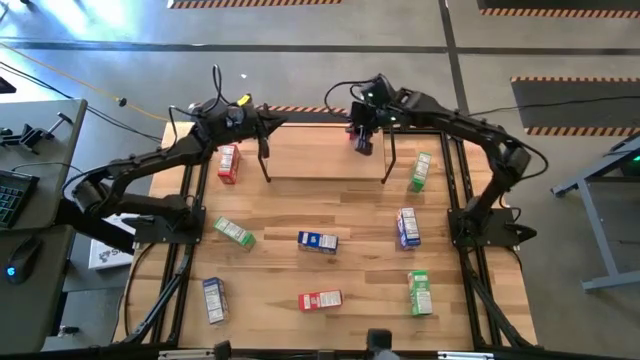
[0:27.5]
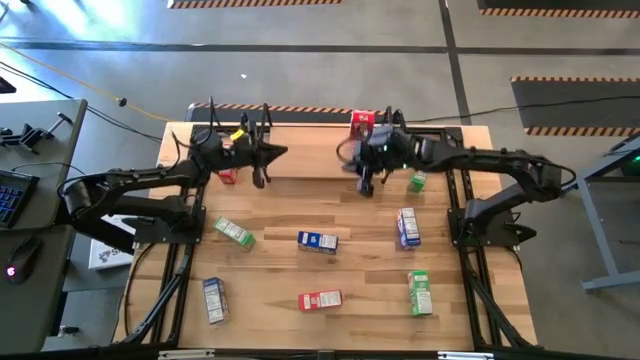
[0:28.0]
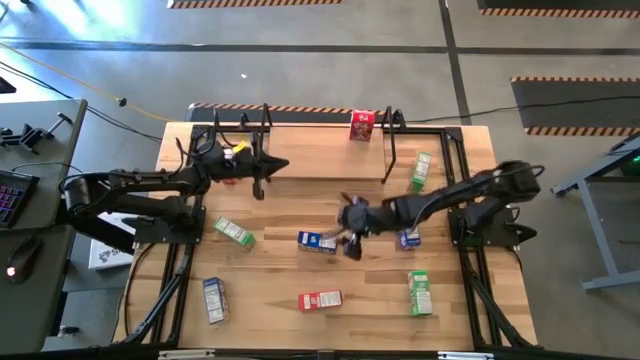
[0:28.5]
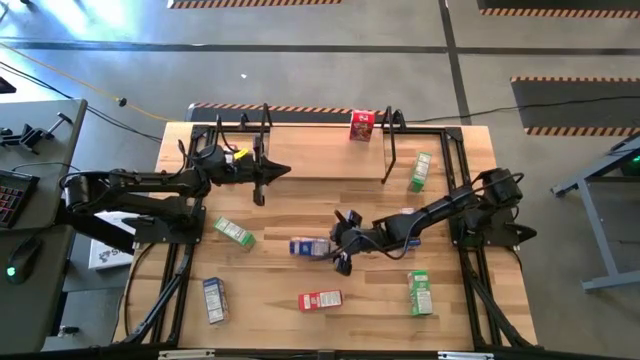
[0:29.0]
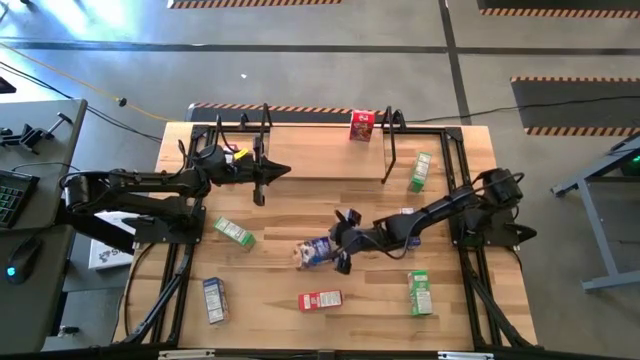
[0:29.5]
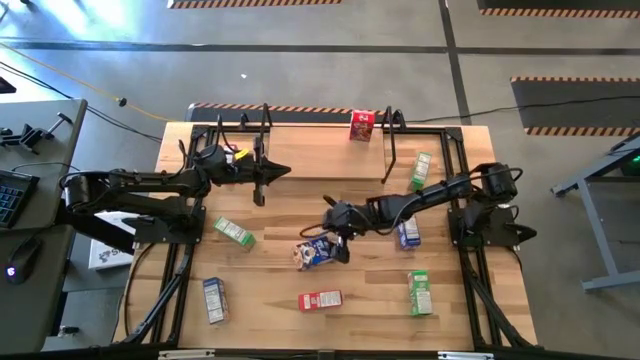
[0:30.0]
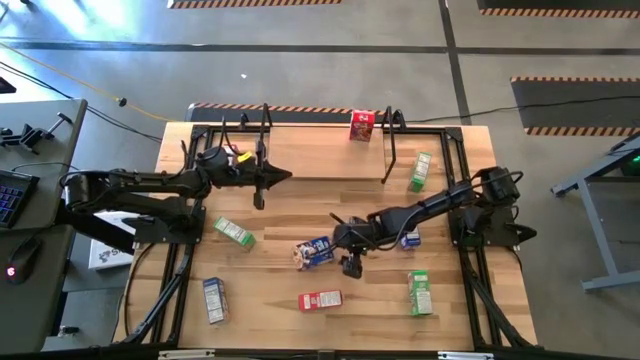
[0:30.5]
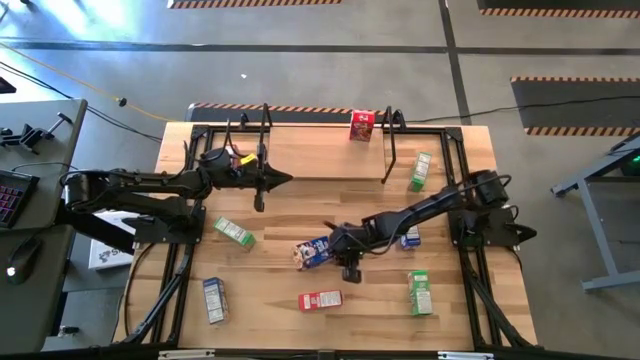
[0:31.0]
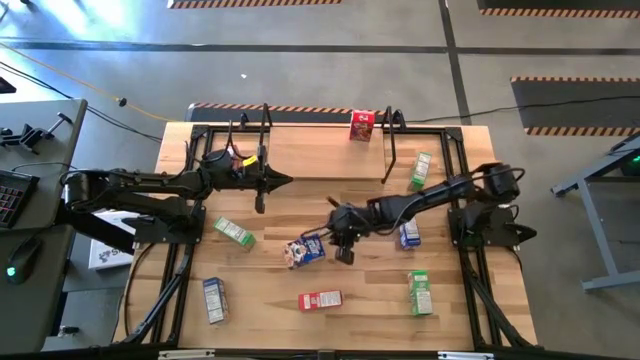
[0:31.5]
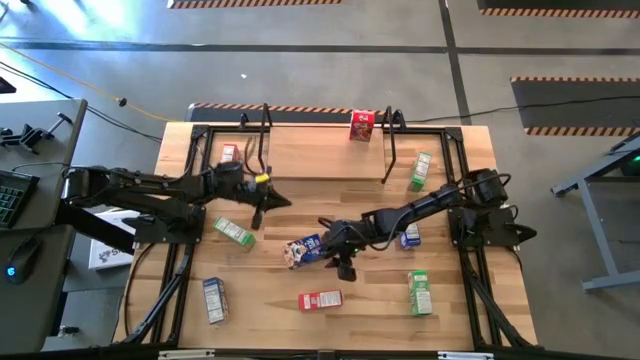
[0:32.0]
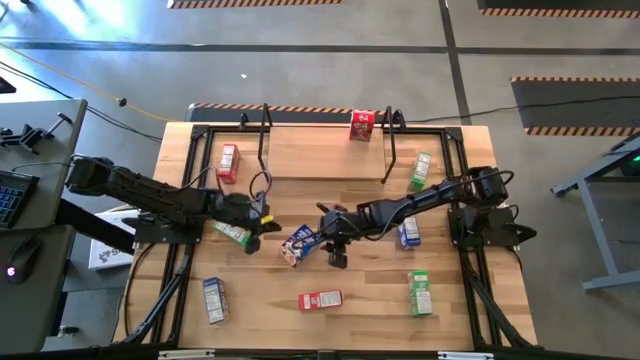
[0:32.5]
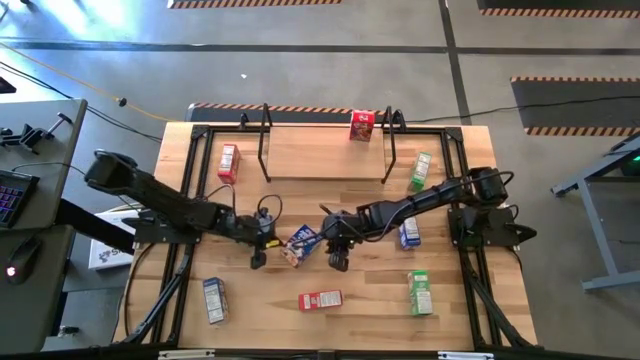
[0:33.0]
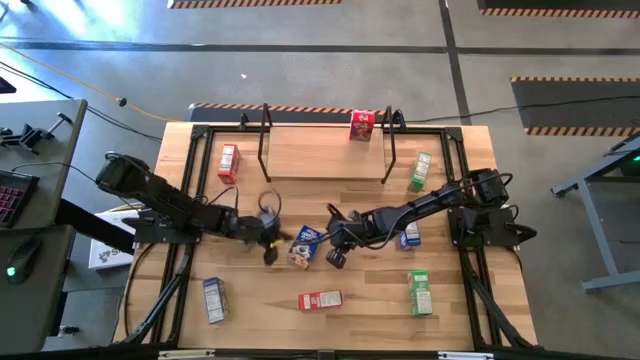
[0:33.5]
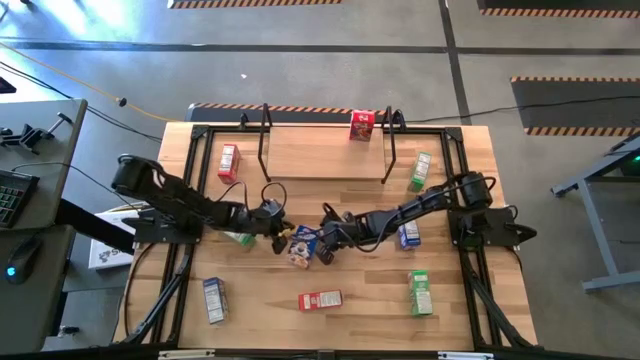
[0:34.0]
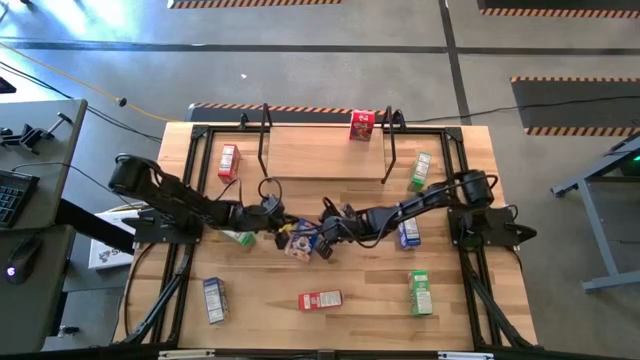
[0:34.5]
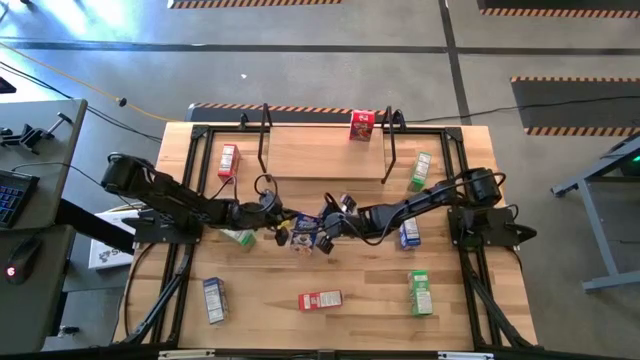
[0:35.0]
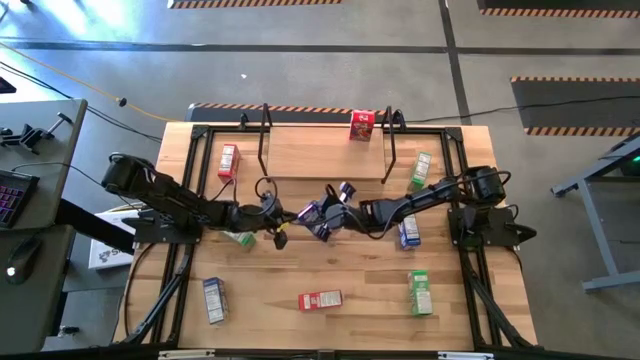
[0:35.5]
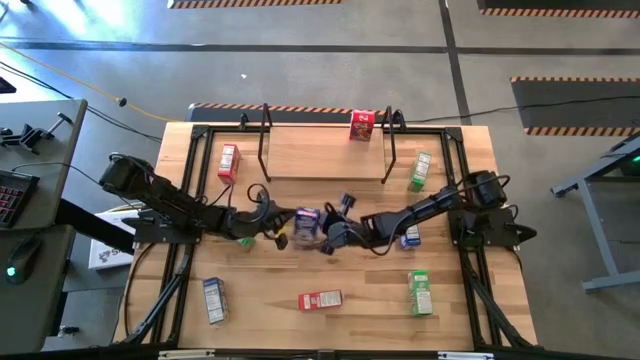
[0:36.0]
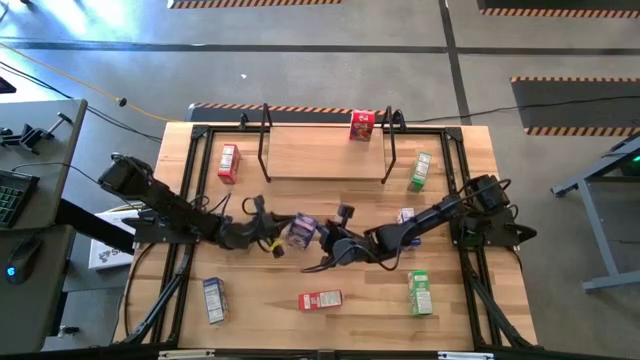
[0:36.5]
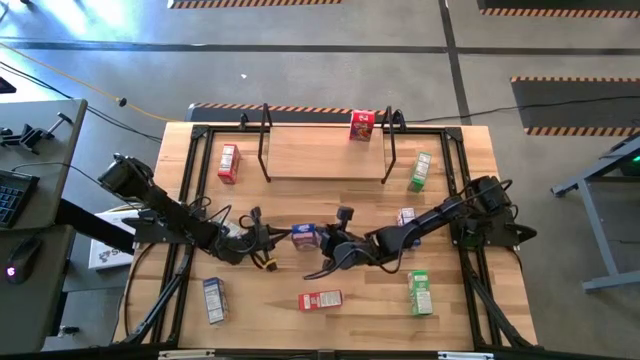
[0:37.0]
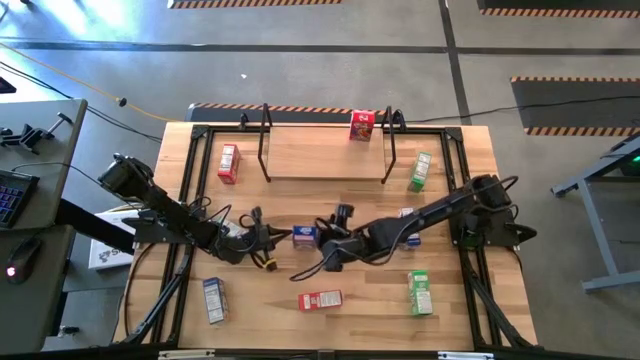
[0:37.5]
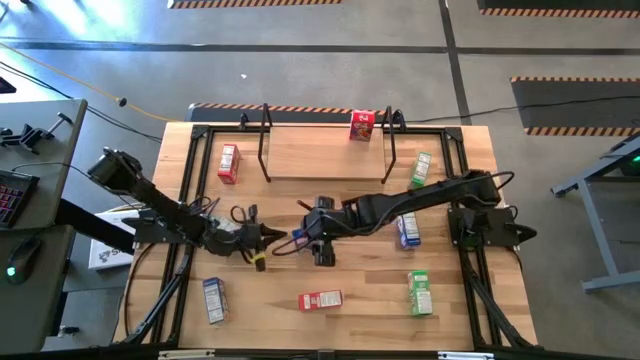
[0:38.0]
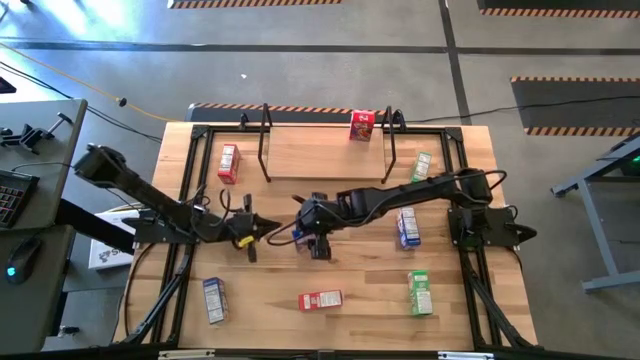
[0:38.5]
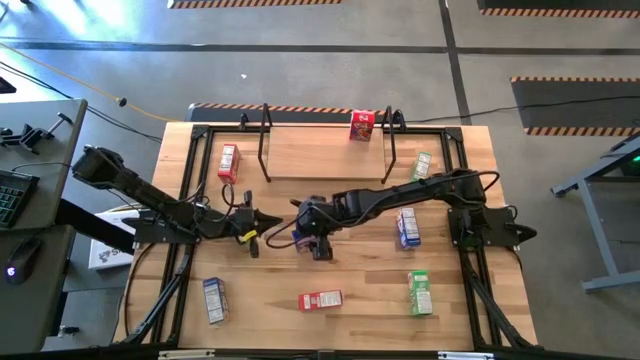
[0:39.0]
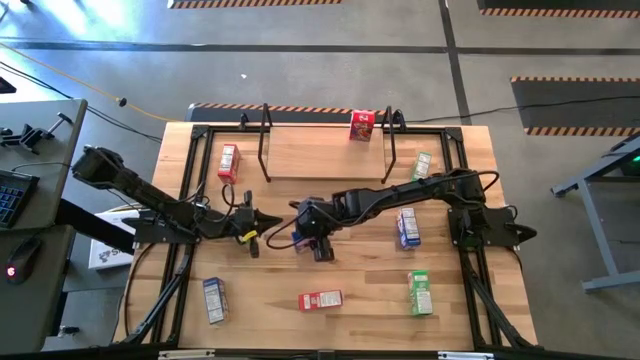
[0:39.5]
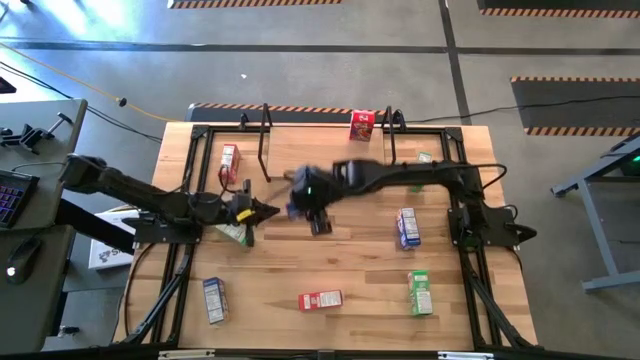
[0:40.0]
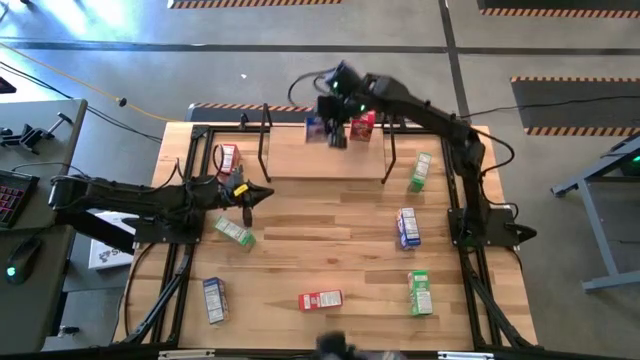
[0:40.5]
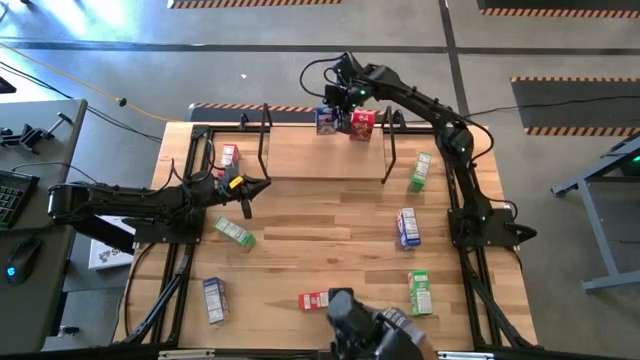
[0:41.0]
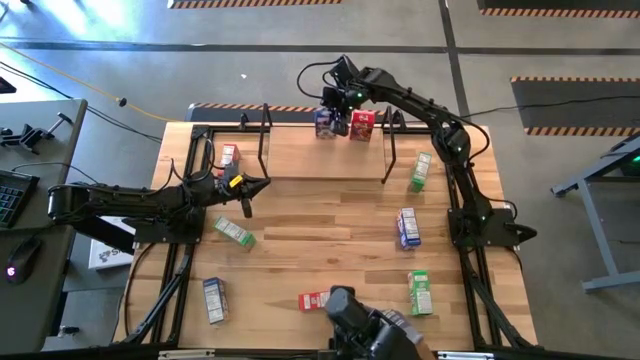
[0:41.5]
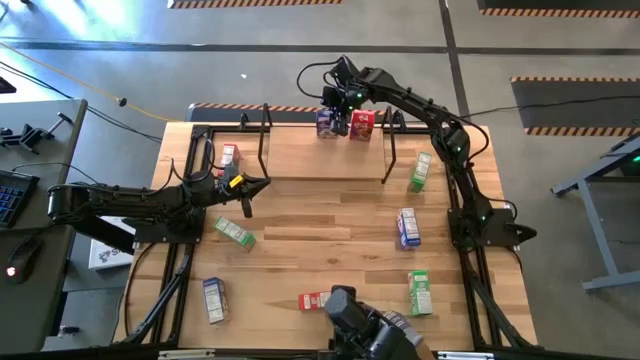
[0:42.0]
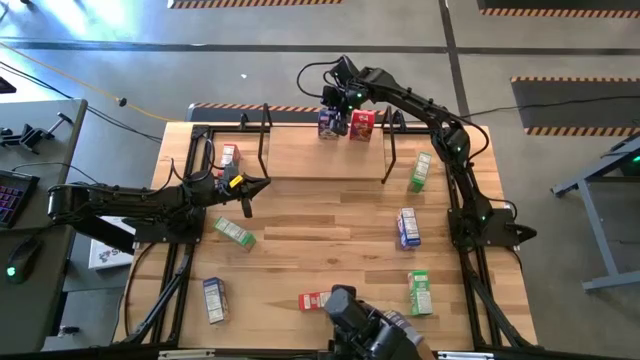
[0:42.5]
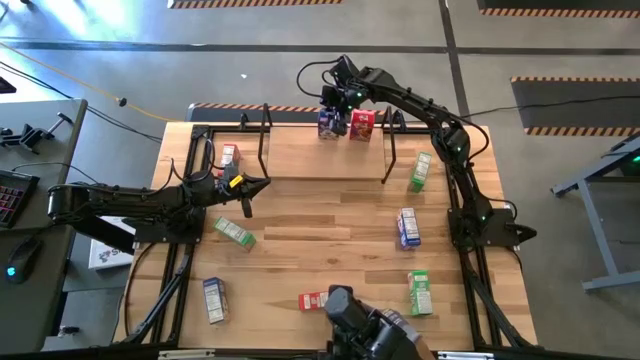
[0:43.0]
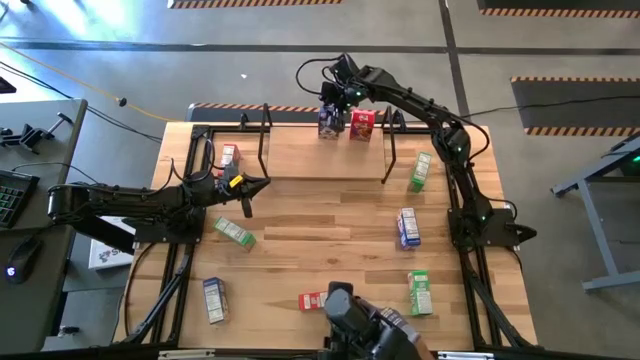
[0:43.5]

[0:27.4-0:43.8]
Task: Stack cereal on shelf
Put the middle blue cereal box on the shelf

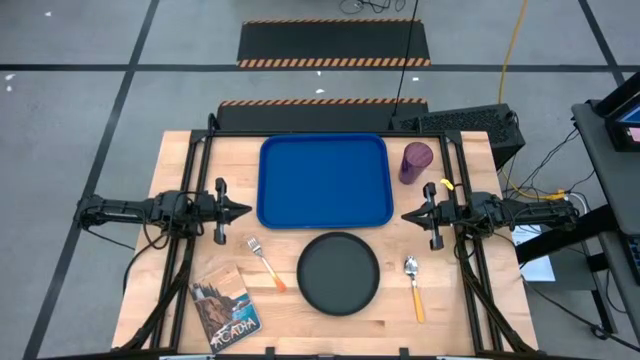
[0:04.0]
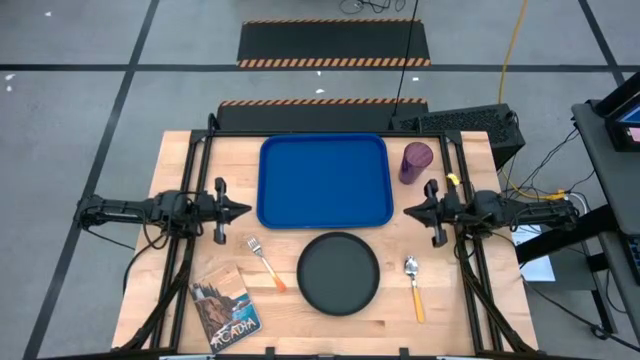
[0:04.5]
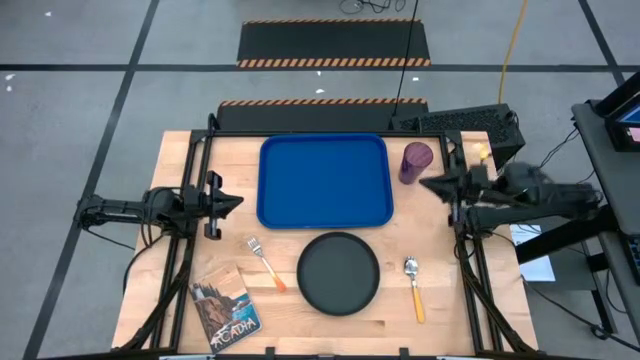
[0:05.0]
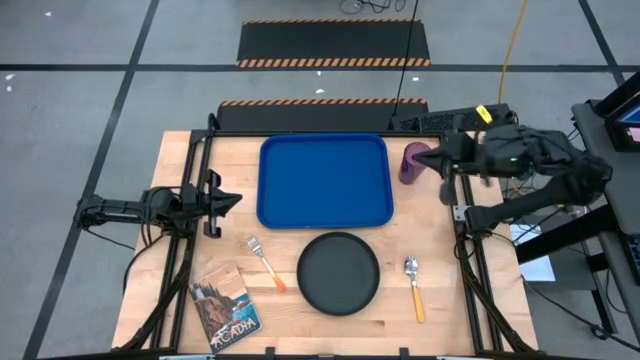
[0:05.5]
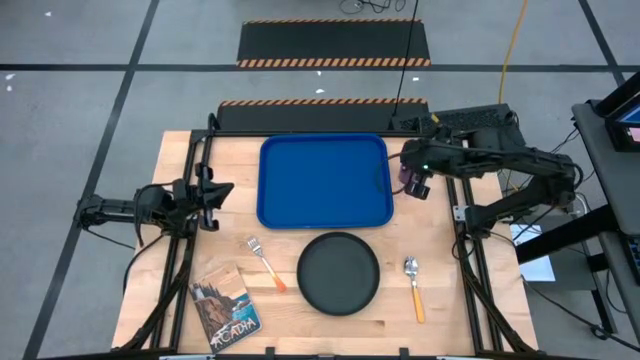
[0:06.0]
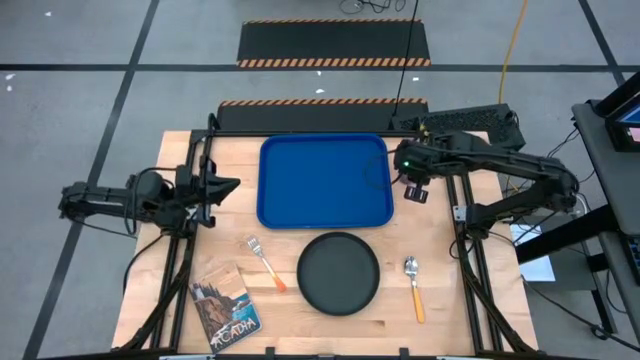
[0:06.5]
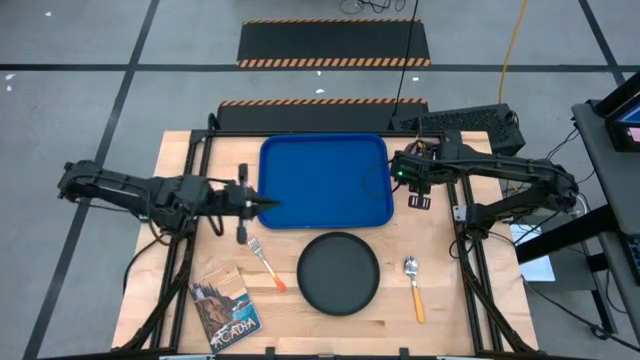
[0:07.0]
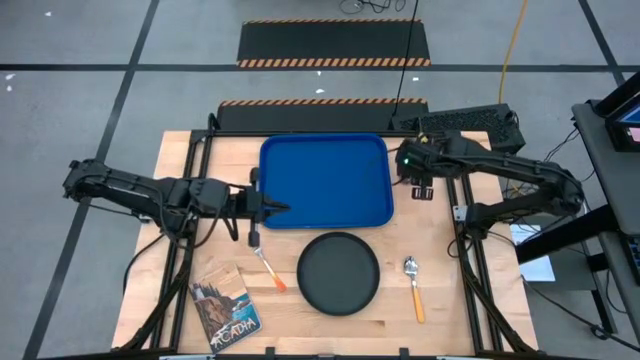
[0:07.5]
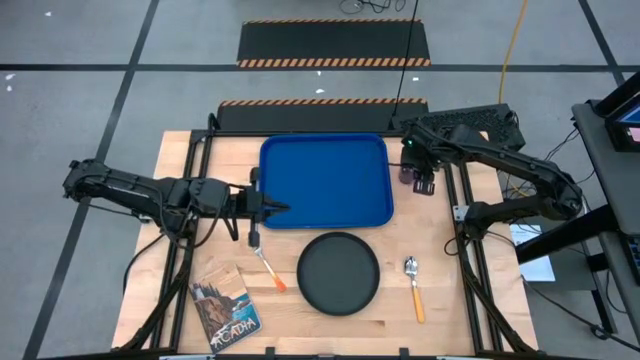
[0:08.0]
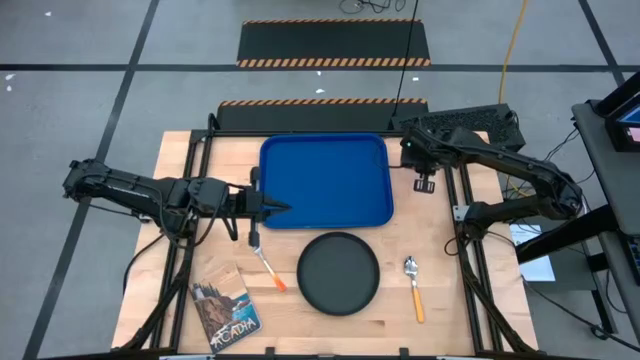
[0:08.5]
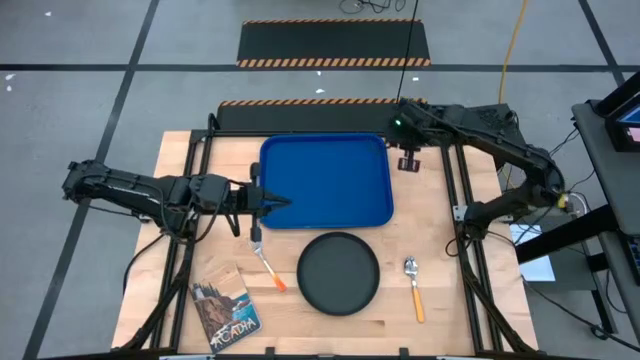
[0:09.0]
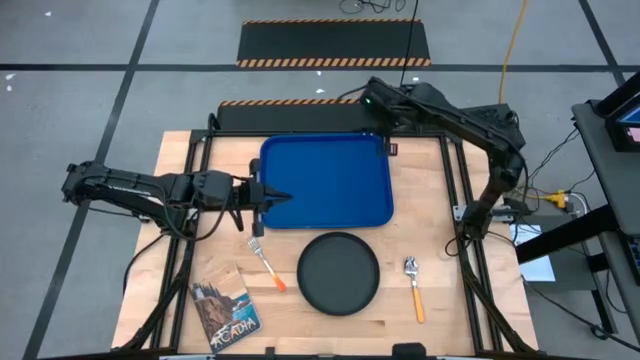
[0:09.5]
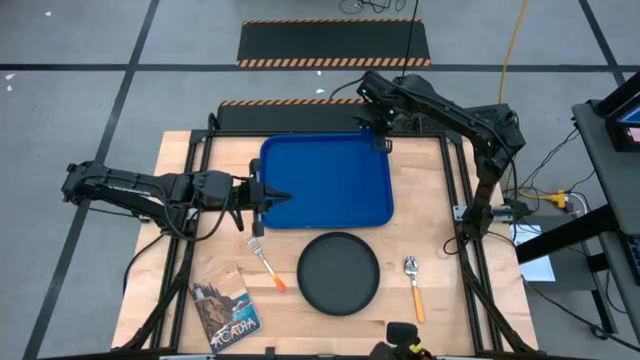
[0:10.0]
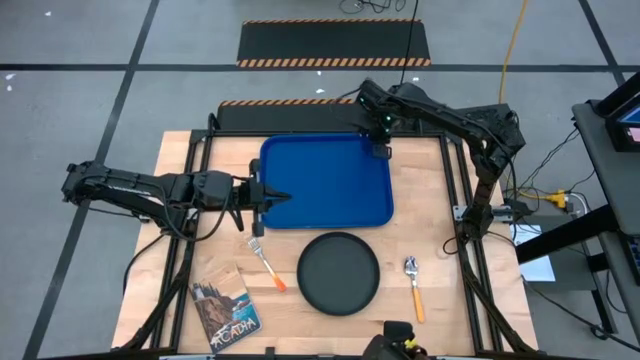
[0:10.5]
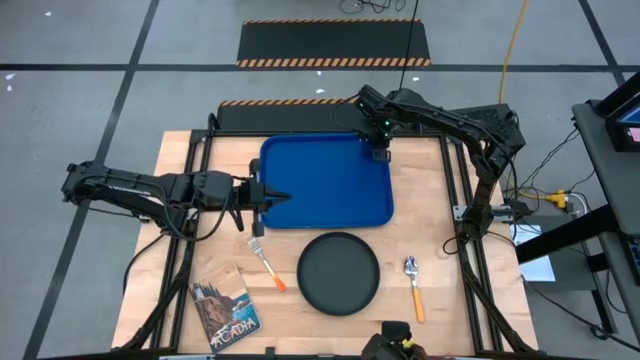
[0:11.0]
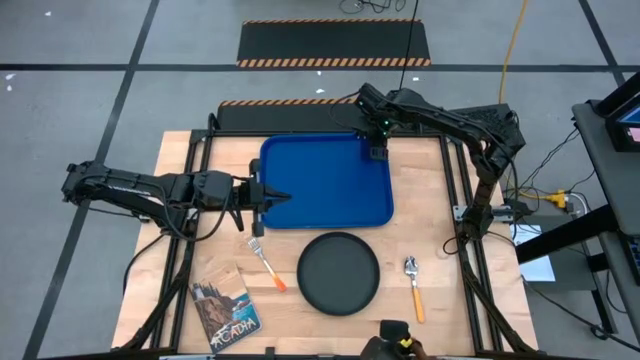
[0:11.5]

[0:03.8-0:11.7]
Task: Pick and place plate/cup/fork/spoon on tray
Put the violet cup on the blue serving tray
